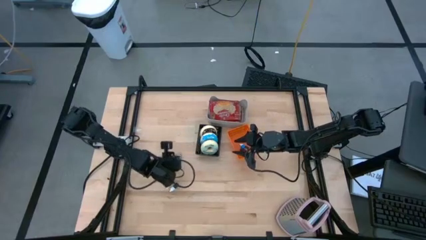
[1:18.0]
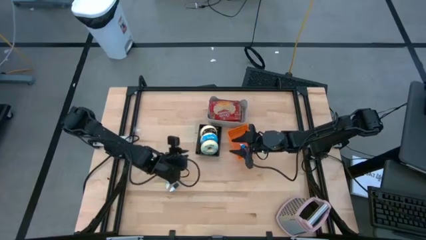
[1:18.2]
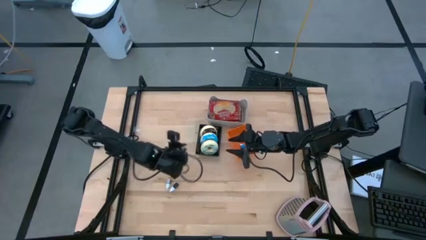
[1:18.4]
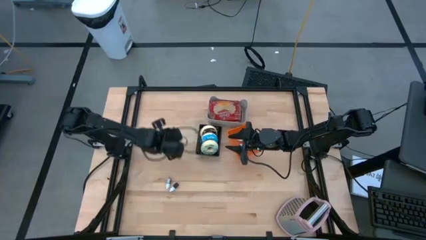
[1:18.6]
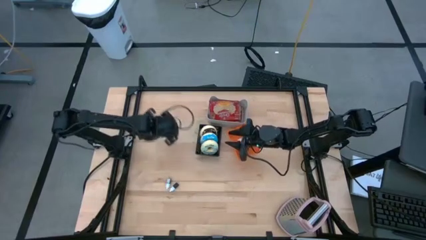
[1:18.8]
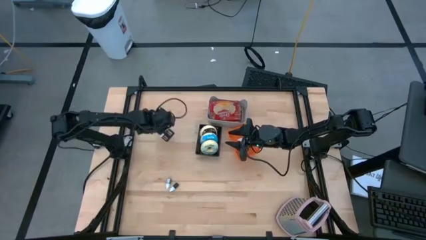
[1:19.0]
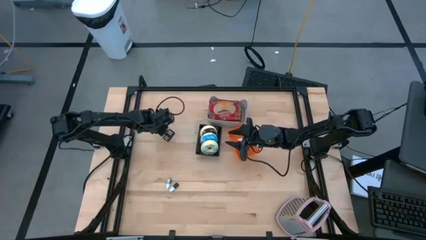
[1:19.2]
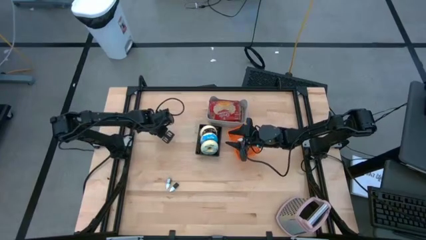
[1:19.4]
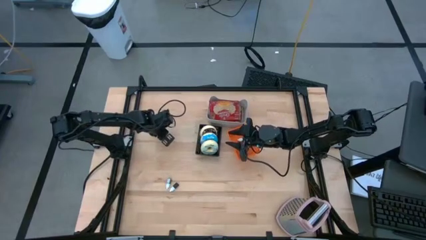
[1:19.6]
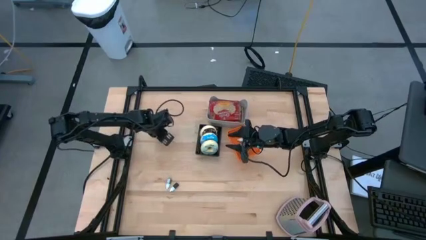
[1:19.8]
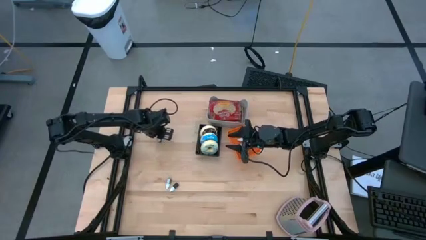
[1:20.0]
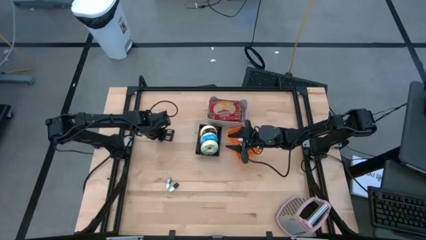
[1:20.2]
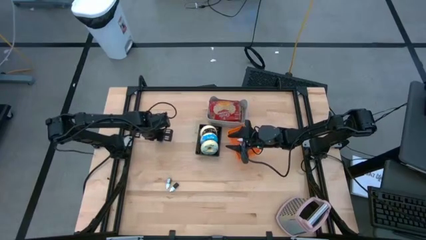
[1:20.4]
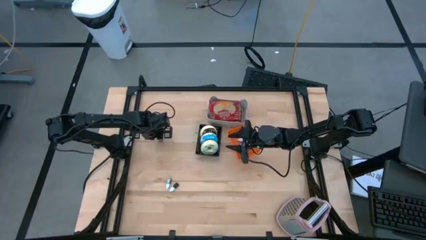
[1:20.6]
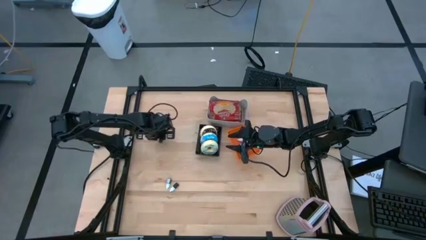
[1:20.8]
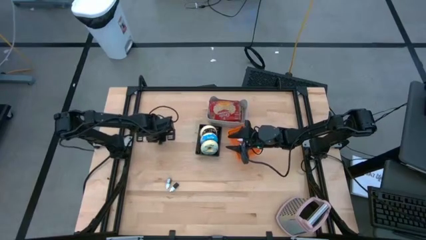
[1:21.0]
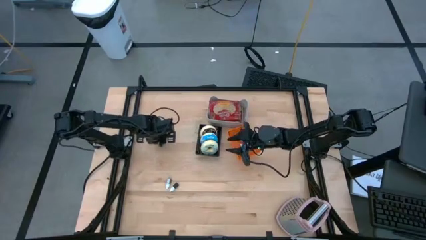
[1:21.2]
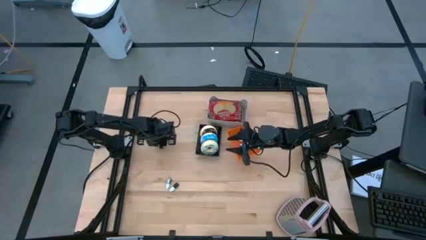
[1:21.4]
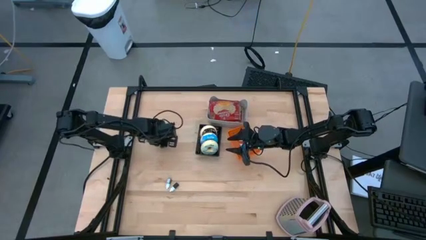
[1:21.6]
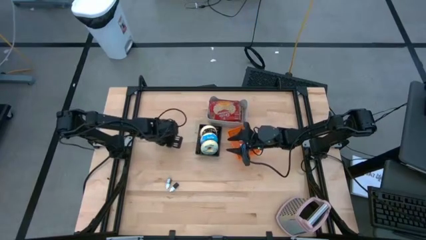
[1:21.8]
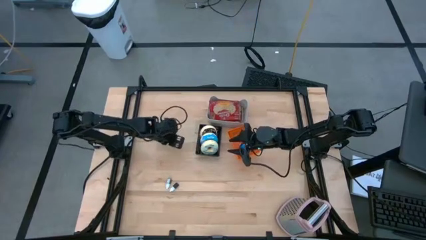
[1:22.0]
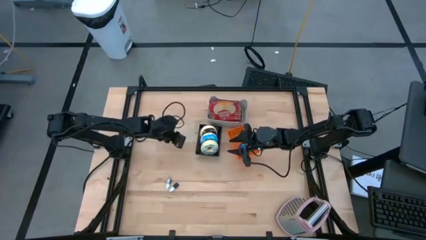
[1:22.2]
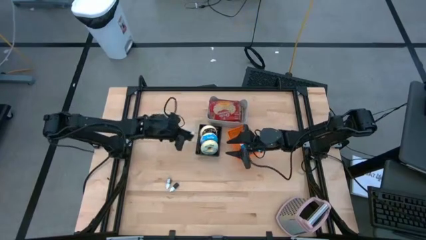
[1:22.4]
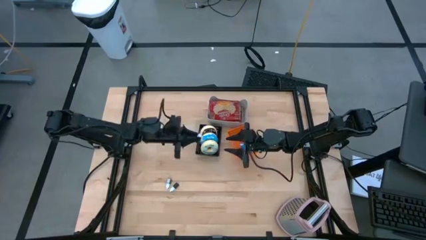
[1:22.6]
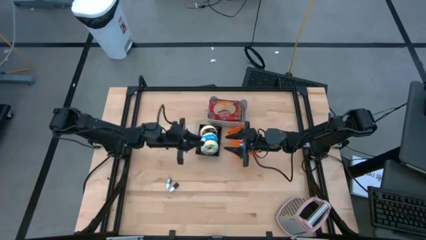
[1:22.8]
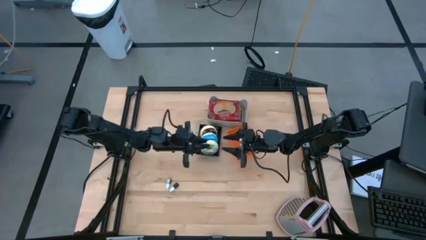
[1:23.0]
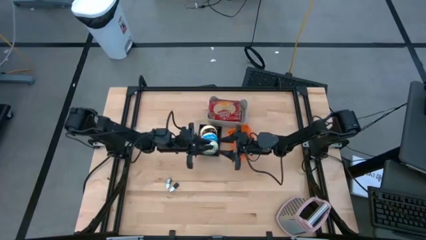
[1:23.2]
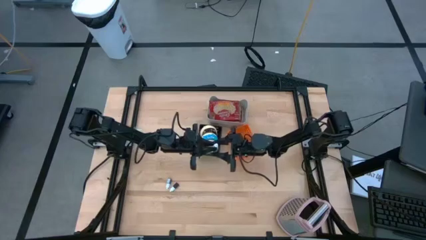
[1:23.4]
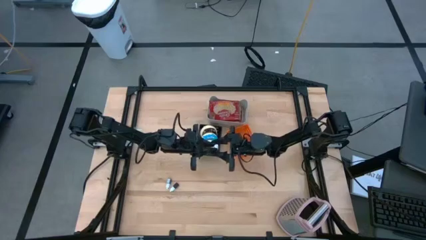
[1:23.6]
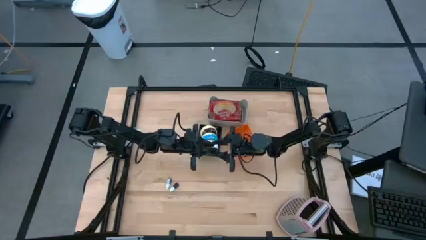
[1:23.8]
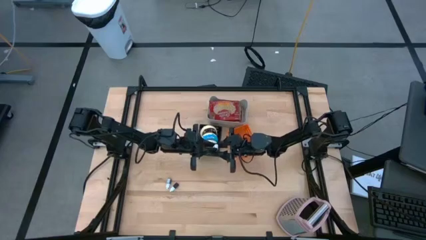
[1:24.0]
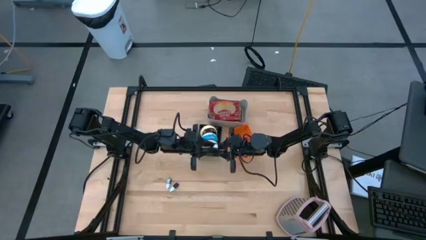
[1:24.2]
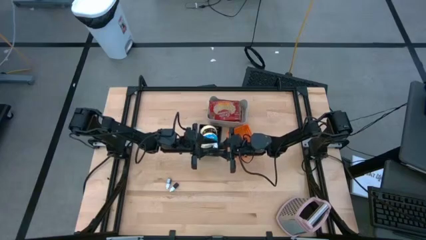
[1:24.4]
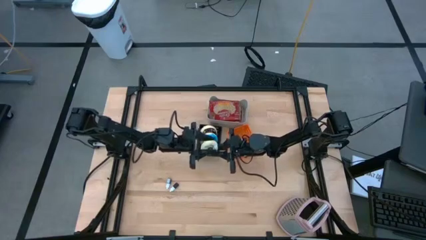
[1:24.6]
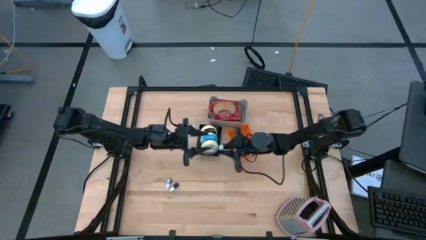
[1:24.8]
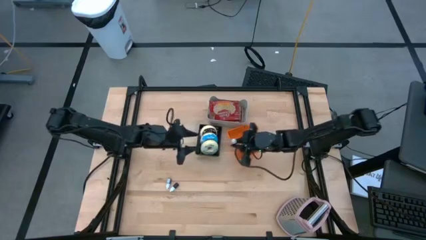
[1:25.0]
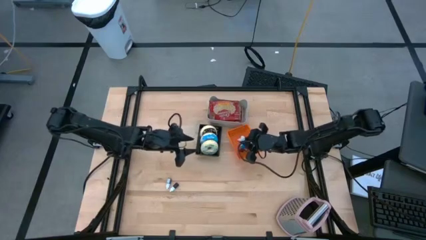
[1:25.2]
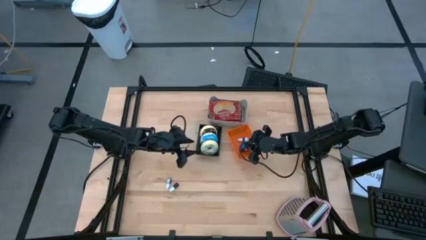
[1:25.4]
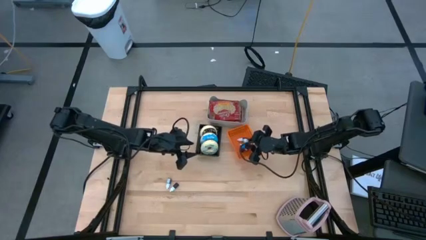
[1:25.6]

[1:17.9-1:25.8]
Put the green food coloring into the orange bin

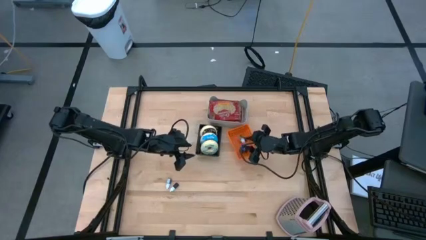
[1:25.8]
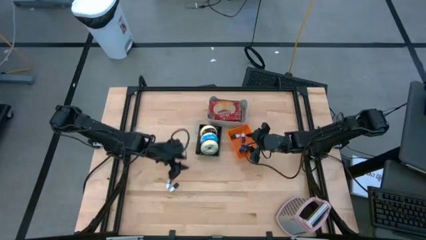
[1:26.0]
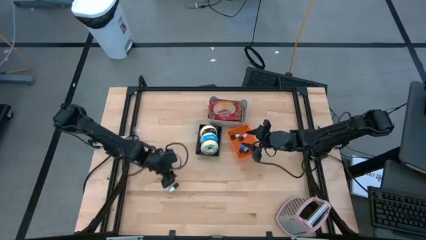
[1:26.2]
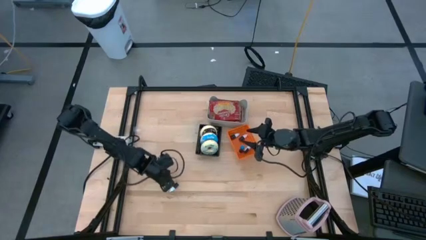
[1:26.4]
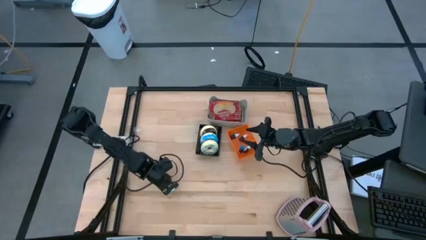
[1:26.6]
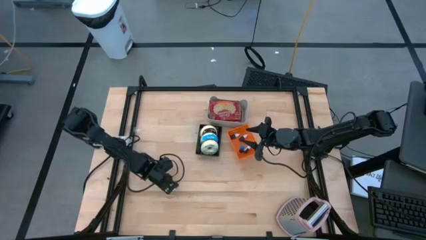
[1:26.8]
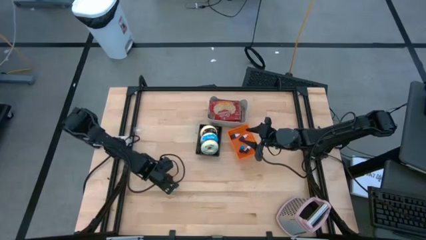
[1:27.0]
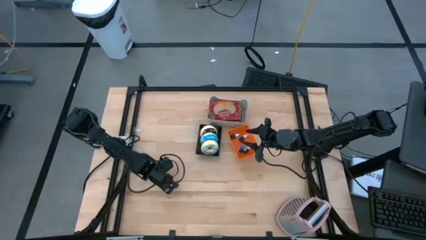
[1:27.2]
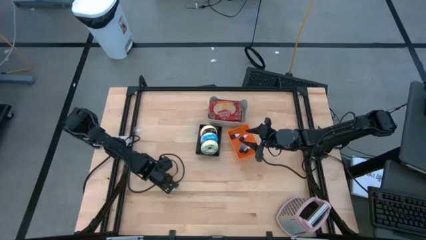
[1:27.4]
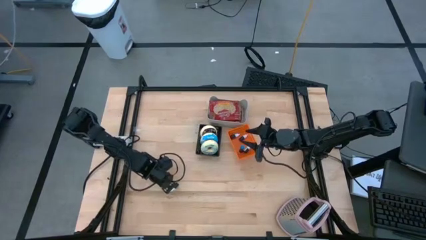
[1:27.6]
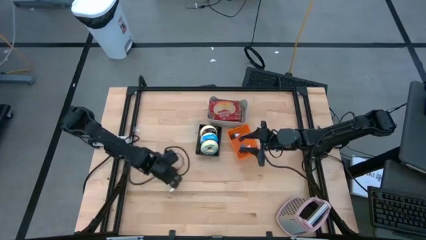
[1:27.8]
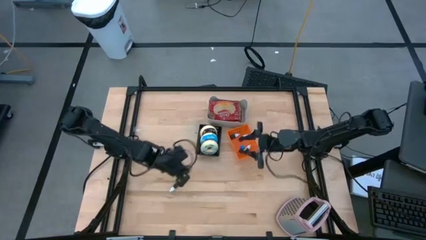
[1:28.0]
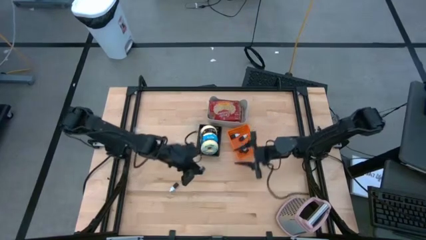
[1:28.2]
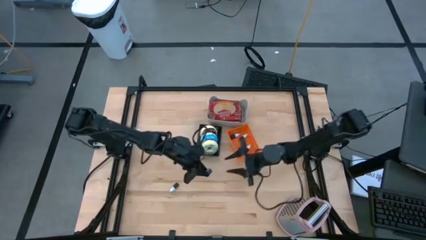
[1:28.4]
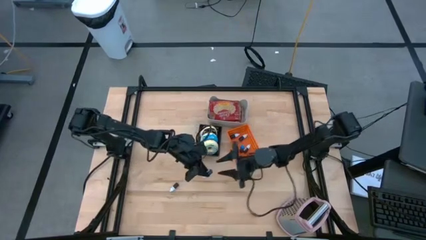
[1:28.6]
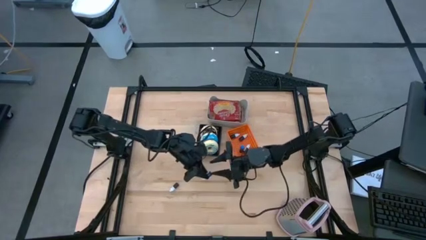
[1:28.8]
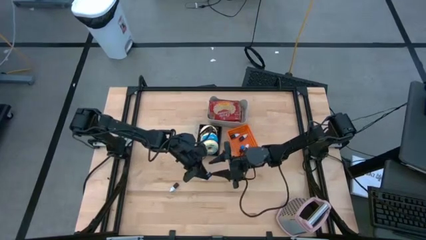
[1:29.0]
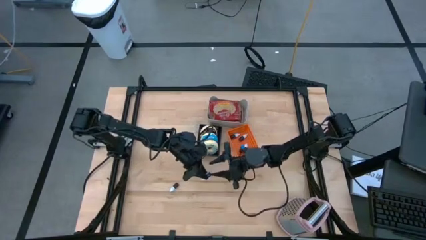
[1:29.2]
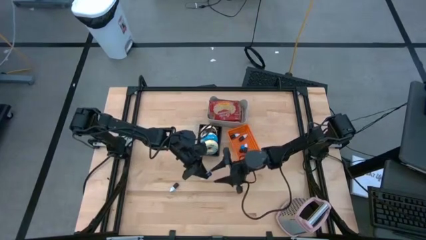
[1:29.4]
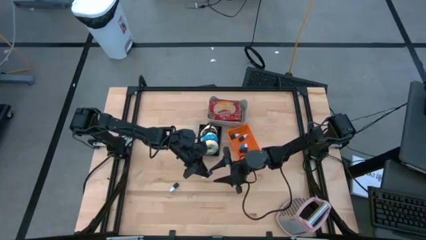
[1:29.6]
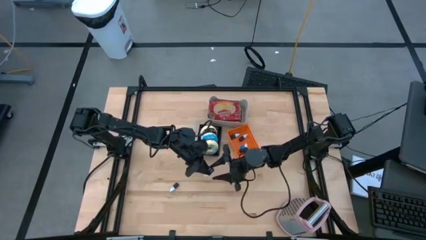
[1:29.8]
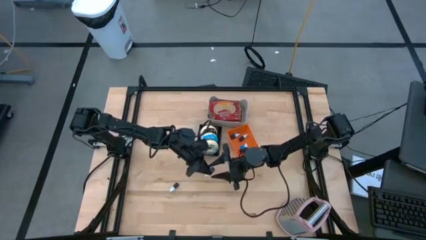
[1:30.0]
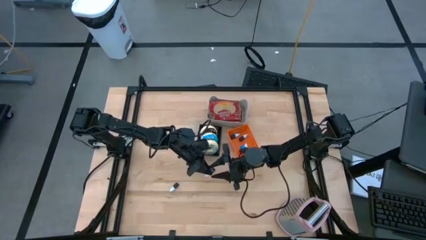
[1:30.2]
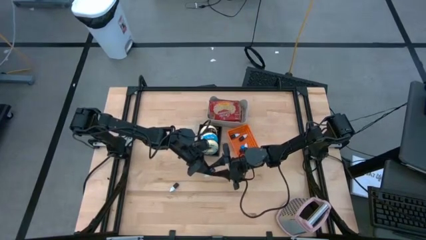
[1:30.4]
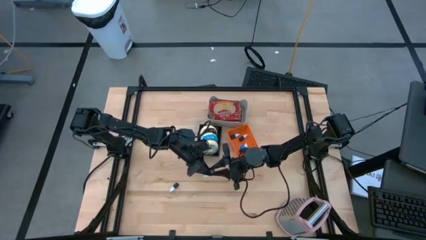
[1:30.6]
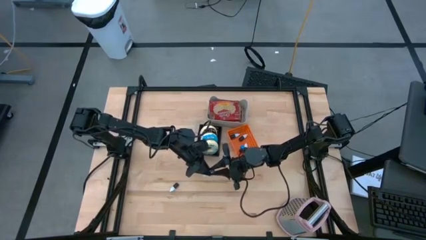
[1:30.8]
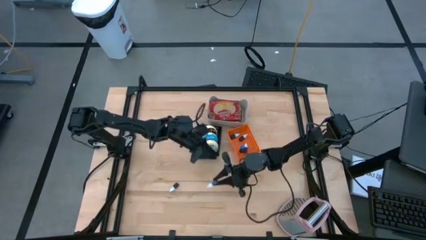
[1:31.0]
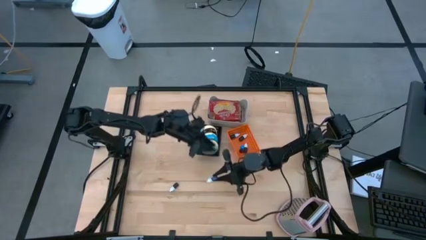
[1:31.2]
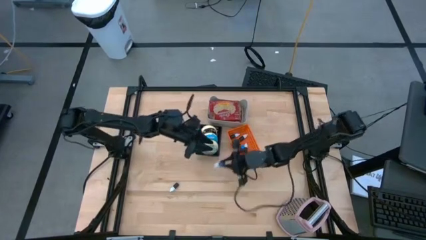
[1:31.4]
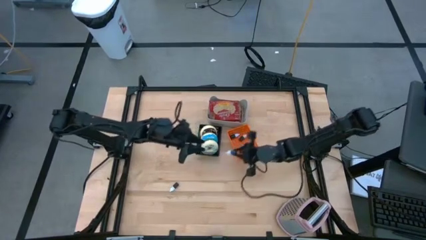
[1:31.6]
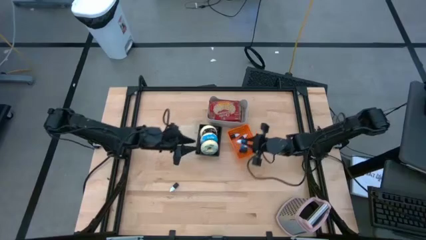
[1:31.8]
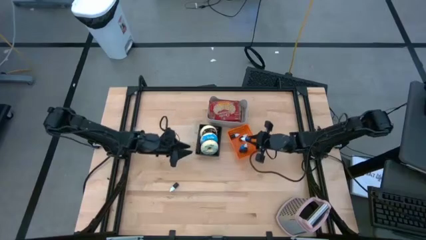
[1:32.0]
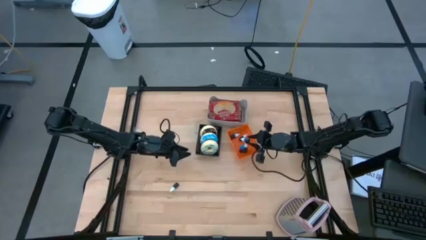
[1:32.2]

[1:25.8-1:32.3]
Put the dark blue food coloring into the orange bin

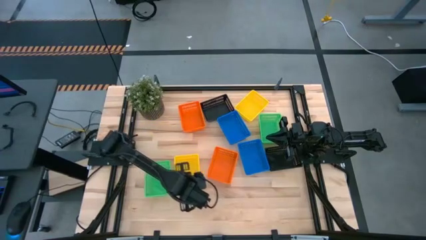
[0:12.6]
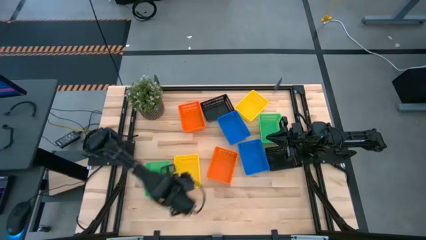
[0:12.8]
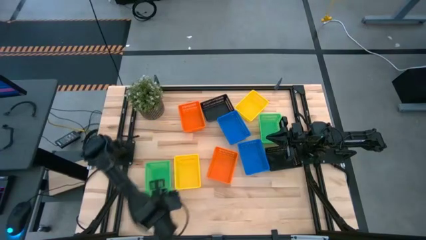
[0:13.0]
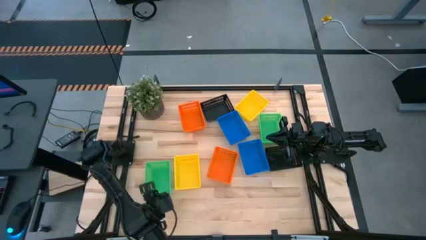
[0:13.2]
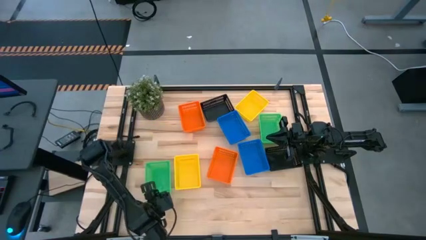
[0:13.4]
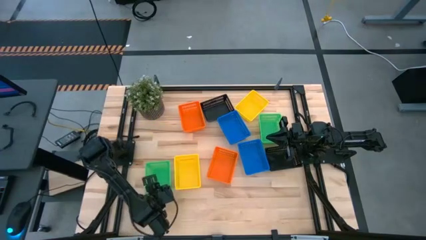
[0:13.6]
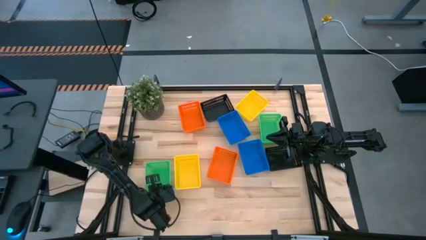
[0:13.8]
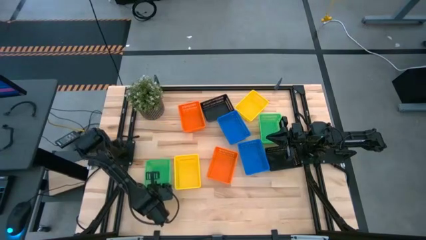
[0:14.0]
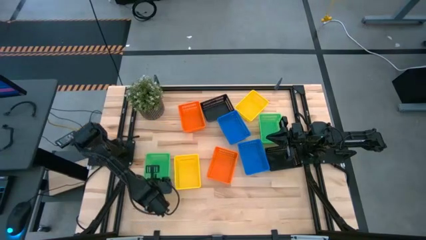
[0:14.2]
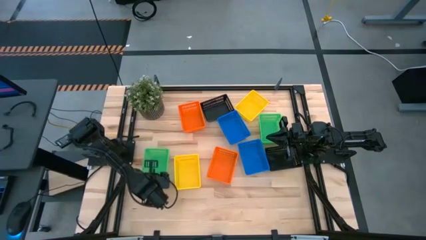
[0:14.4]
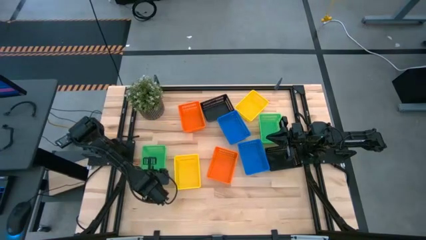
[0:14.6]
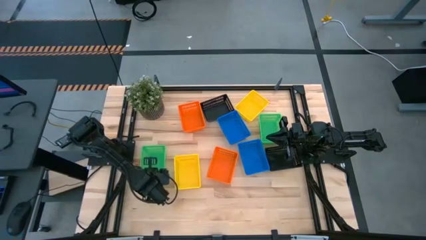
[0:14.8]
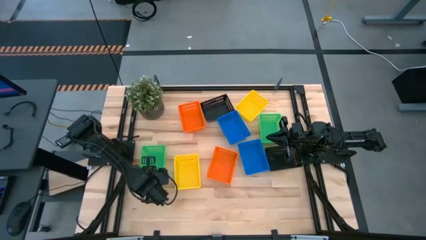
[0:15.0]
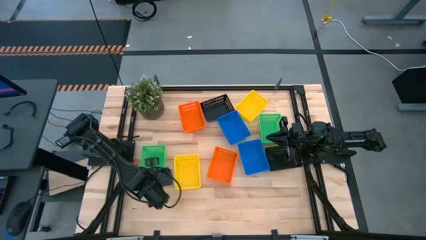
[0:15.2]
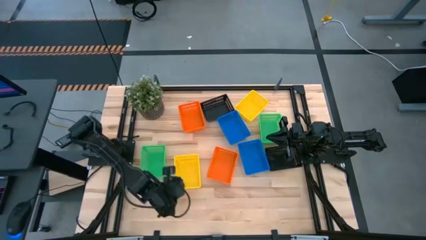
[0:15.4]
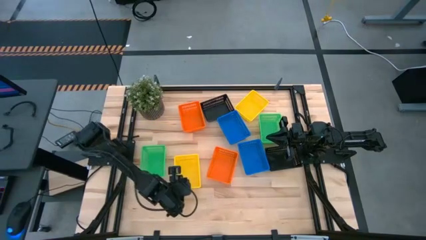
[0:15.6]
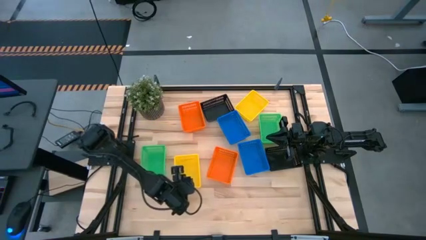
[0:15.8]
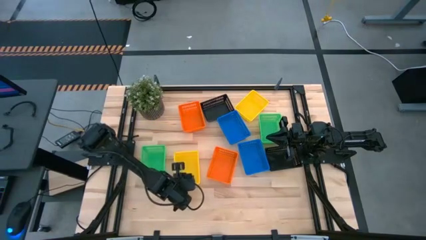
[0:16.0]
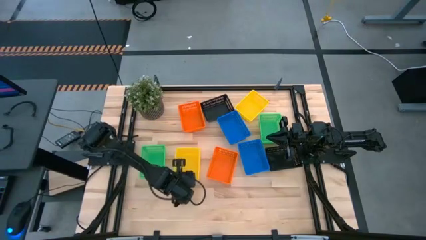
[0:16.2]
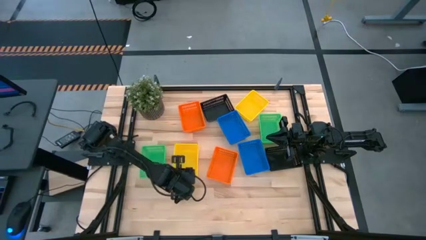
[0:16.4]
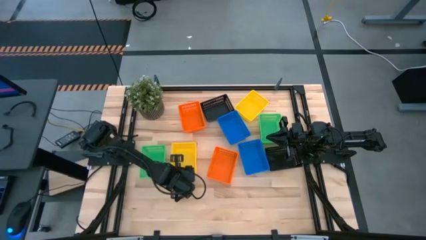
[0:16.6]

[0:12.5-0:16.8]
Adjust the left green bin and bottom yellow bin
